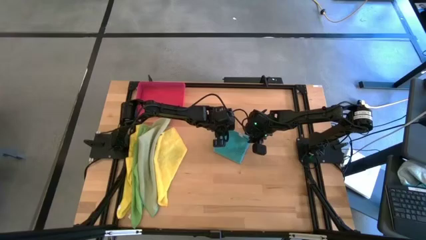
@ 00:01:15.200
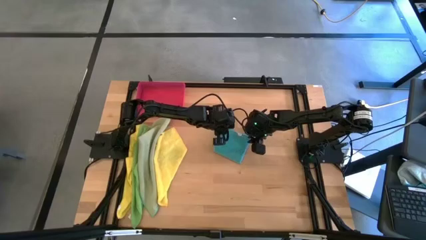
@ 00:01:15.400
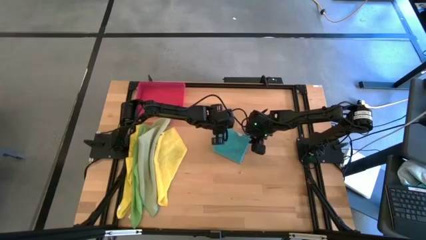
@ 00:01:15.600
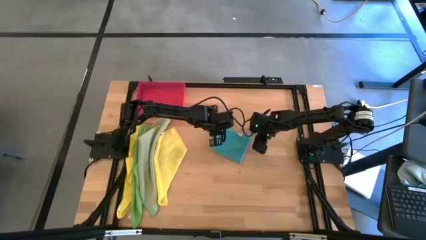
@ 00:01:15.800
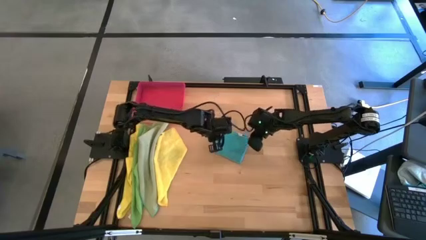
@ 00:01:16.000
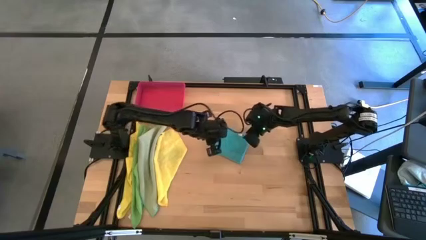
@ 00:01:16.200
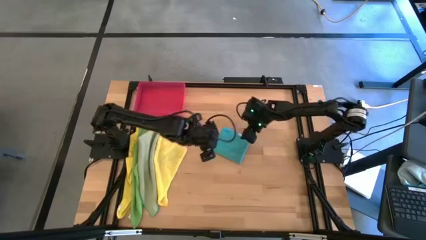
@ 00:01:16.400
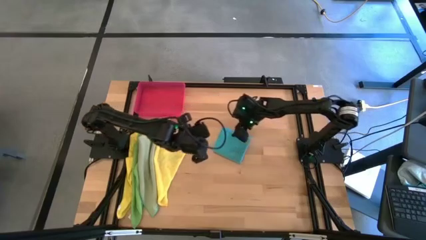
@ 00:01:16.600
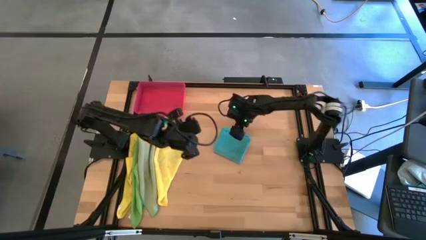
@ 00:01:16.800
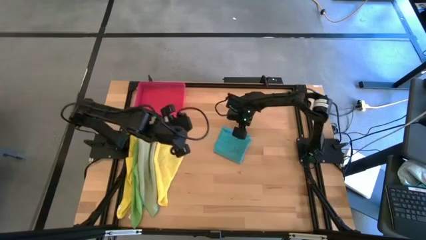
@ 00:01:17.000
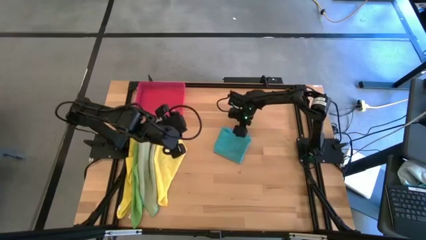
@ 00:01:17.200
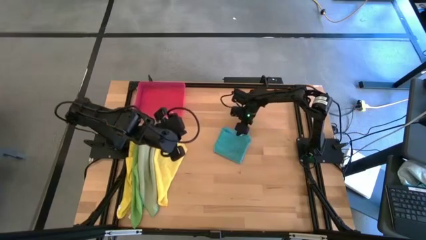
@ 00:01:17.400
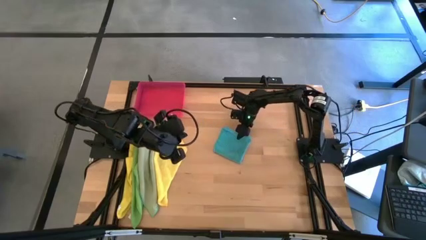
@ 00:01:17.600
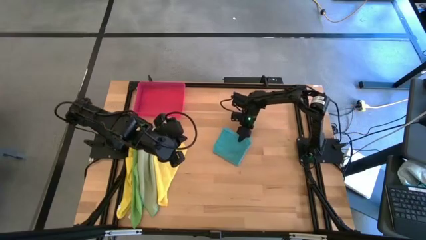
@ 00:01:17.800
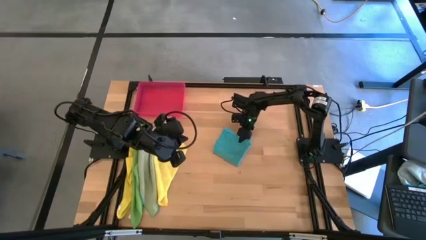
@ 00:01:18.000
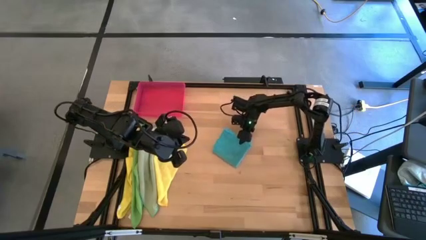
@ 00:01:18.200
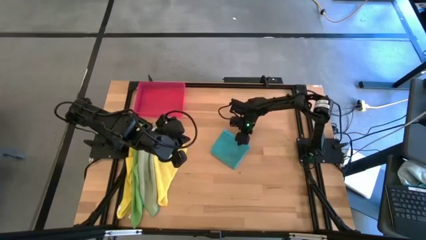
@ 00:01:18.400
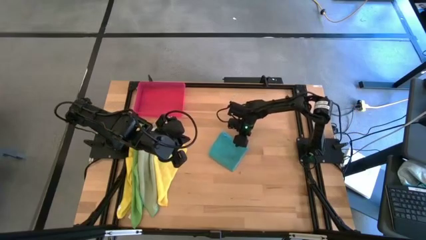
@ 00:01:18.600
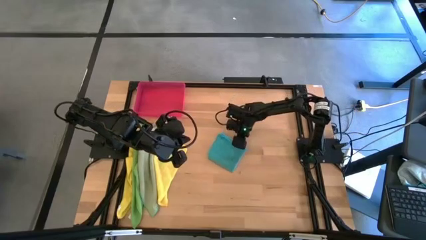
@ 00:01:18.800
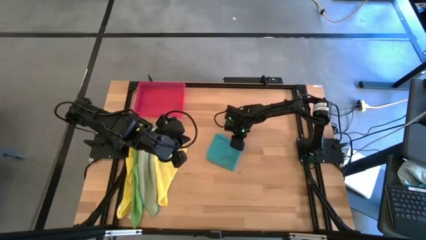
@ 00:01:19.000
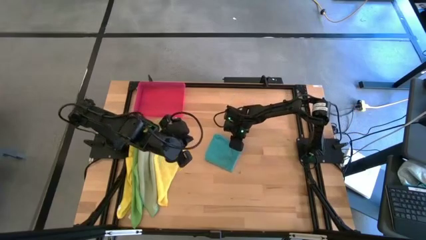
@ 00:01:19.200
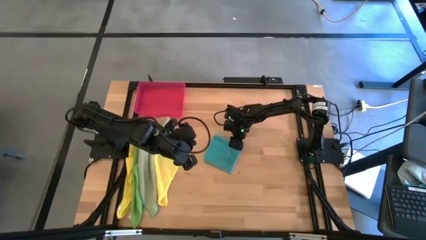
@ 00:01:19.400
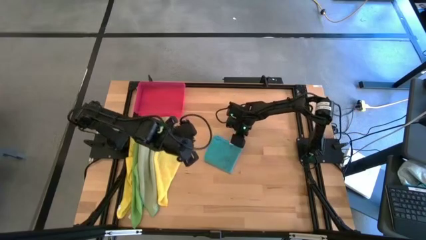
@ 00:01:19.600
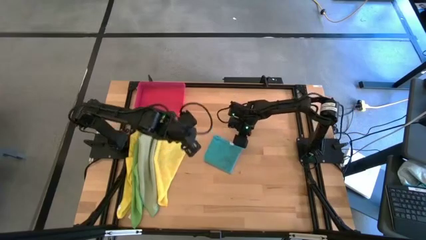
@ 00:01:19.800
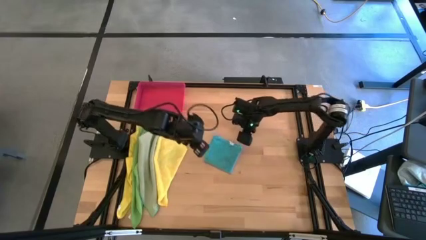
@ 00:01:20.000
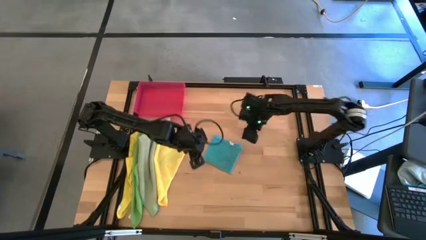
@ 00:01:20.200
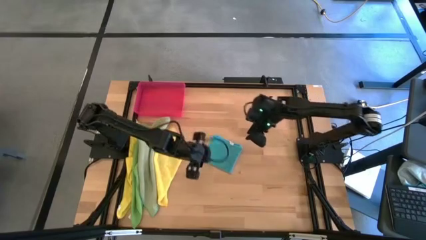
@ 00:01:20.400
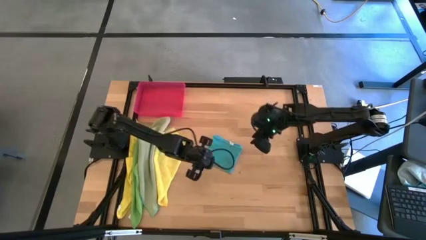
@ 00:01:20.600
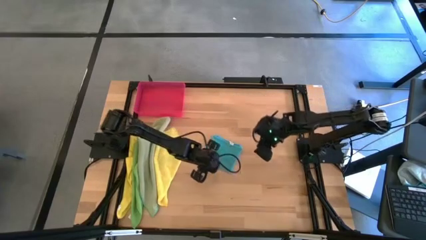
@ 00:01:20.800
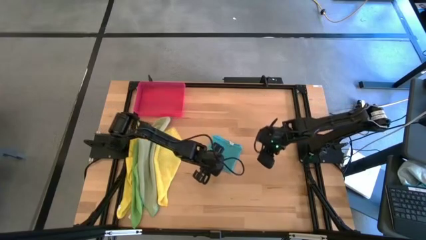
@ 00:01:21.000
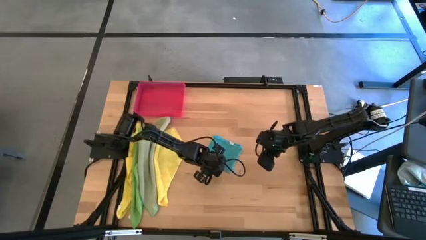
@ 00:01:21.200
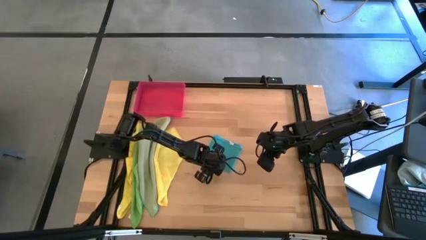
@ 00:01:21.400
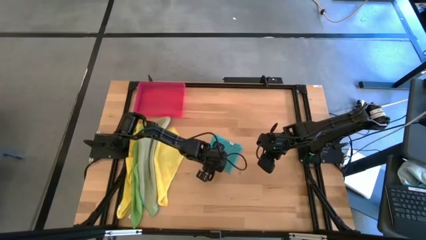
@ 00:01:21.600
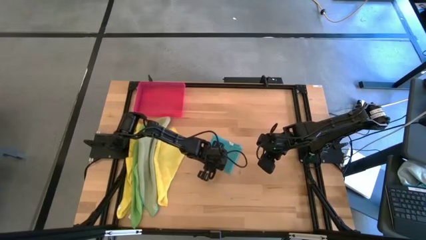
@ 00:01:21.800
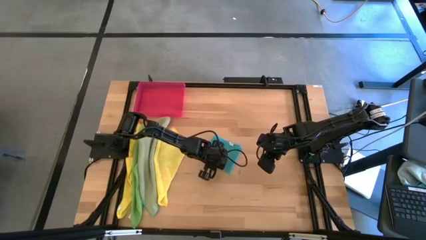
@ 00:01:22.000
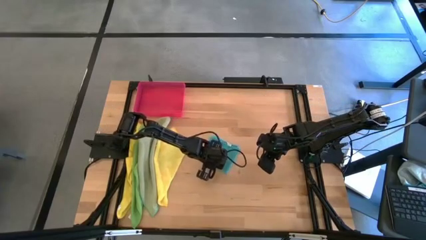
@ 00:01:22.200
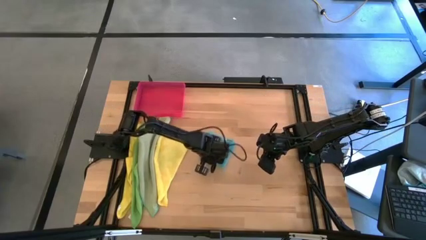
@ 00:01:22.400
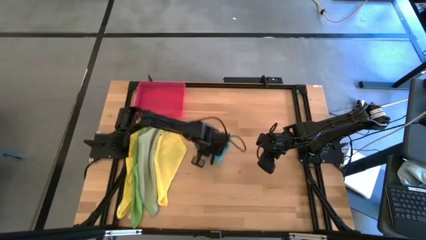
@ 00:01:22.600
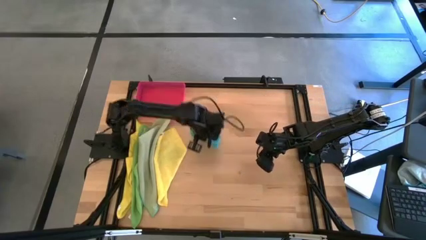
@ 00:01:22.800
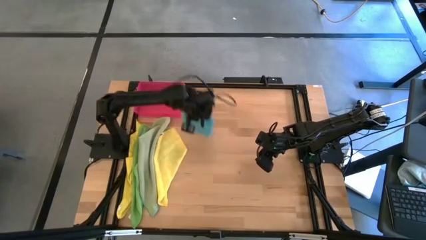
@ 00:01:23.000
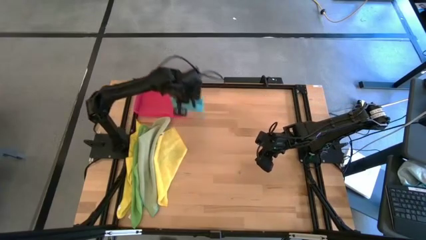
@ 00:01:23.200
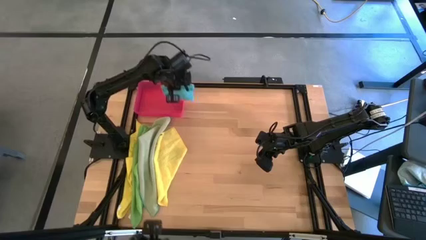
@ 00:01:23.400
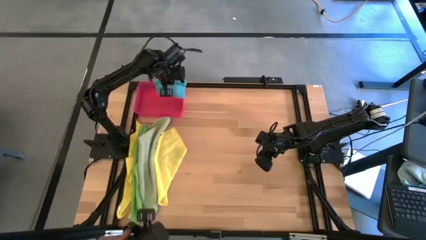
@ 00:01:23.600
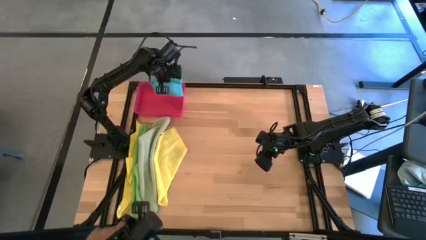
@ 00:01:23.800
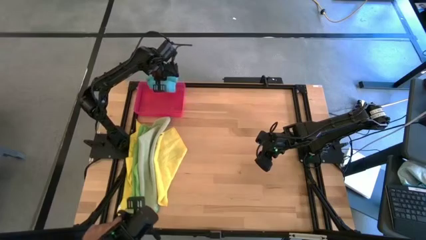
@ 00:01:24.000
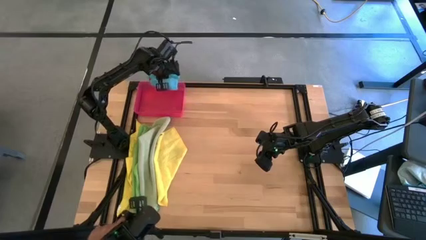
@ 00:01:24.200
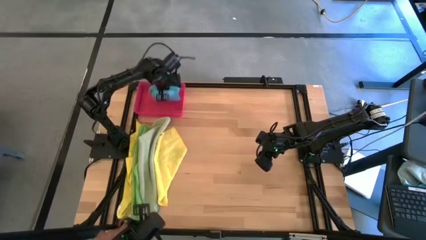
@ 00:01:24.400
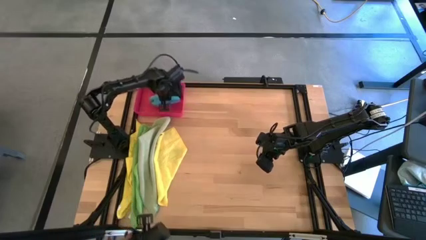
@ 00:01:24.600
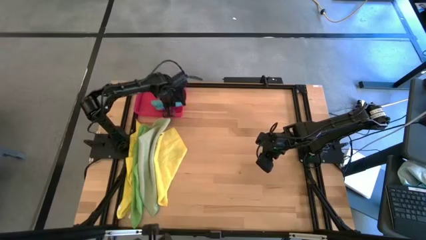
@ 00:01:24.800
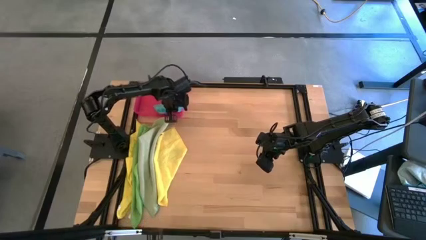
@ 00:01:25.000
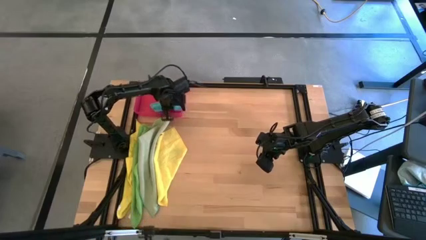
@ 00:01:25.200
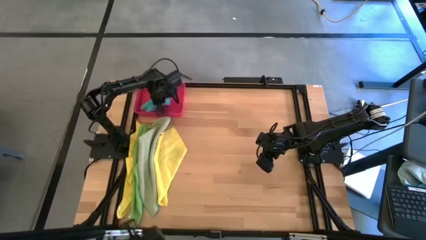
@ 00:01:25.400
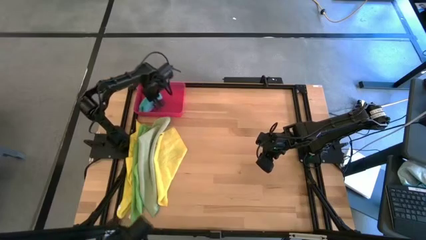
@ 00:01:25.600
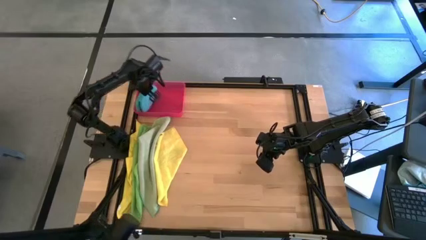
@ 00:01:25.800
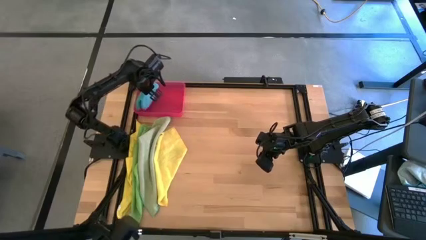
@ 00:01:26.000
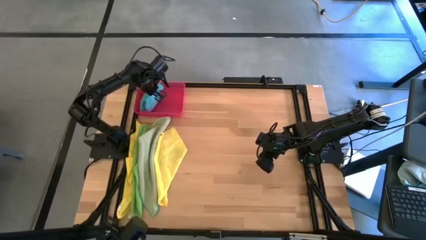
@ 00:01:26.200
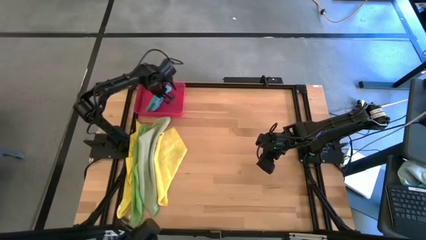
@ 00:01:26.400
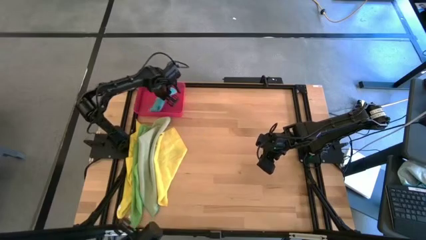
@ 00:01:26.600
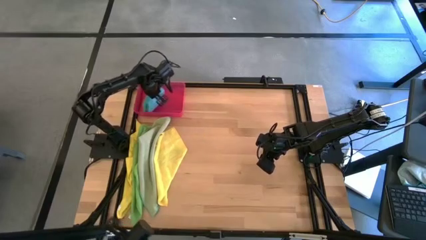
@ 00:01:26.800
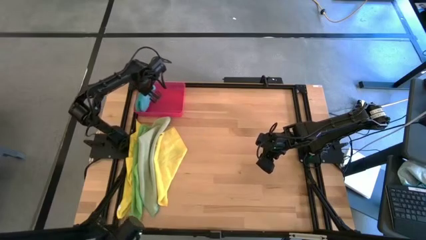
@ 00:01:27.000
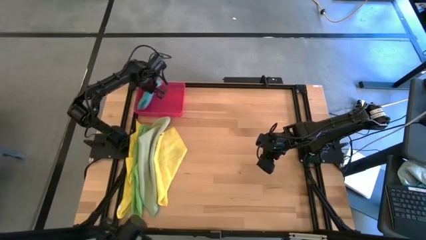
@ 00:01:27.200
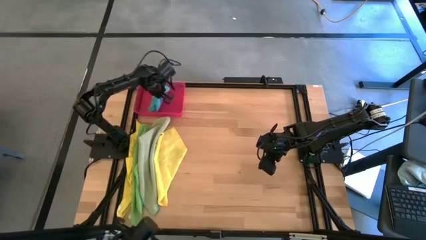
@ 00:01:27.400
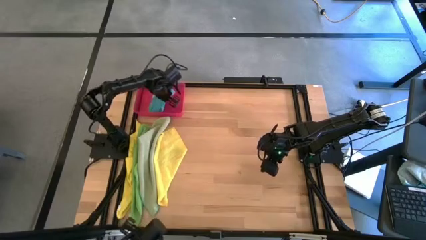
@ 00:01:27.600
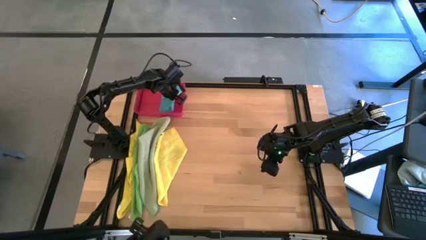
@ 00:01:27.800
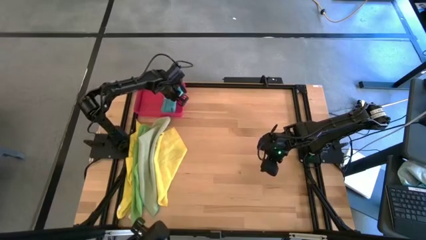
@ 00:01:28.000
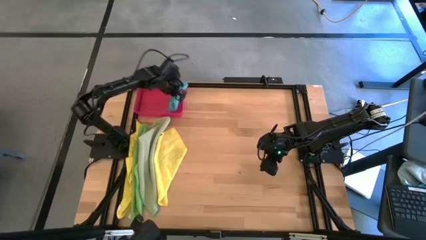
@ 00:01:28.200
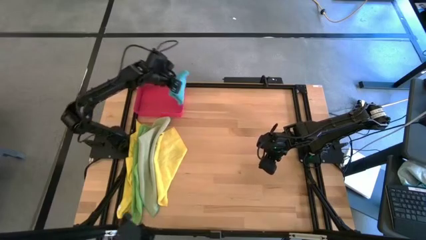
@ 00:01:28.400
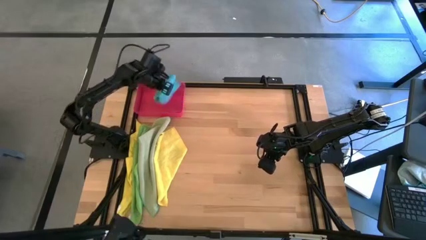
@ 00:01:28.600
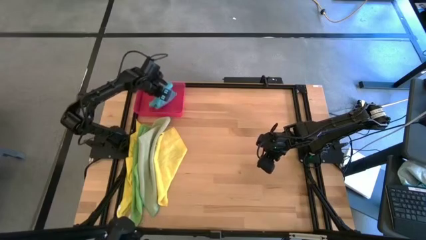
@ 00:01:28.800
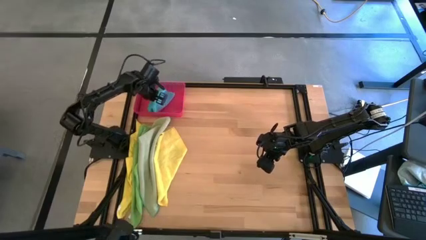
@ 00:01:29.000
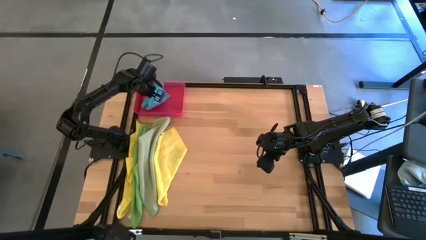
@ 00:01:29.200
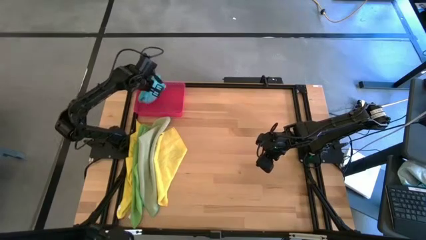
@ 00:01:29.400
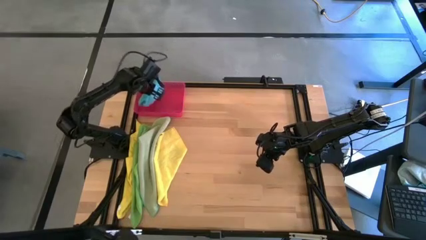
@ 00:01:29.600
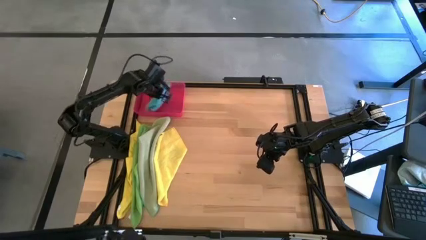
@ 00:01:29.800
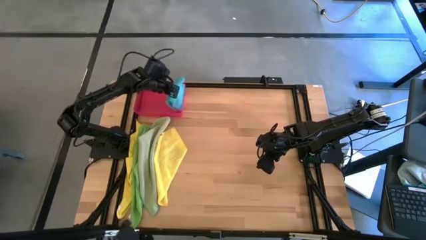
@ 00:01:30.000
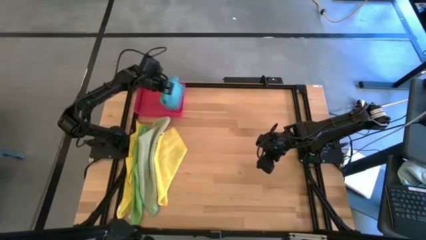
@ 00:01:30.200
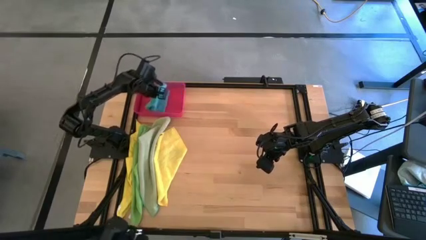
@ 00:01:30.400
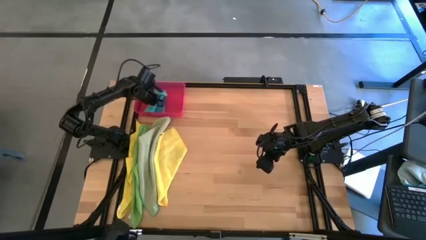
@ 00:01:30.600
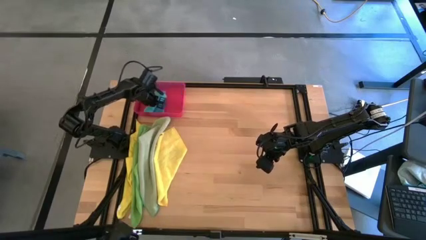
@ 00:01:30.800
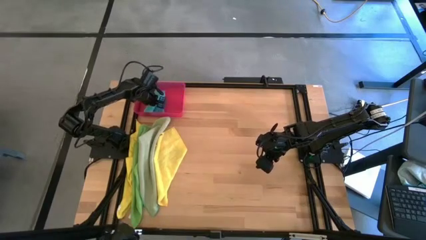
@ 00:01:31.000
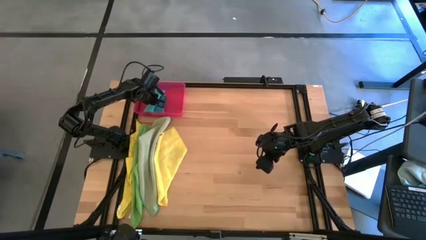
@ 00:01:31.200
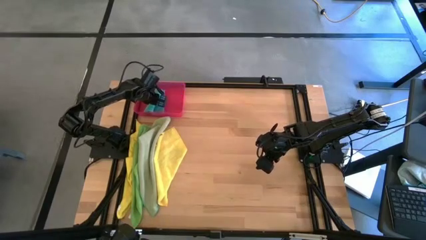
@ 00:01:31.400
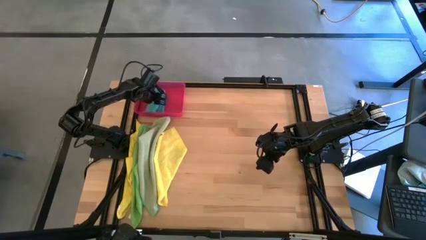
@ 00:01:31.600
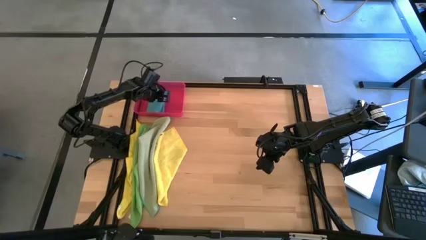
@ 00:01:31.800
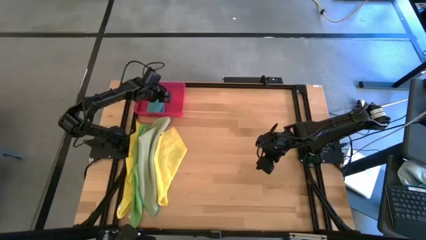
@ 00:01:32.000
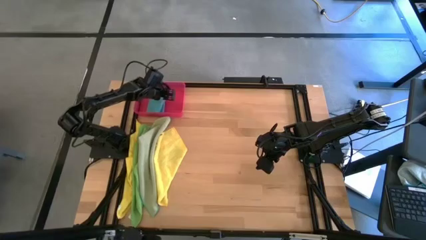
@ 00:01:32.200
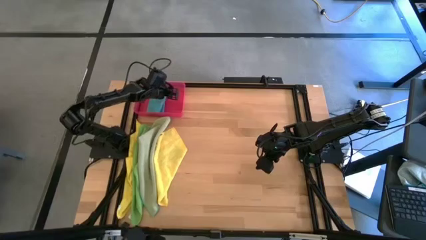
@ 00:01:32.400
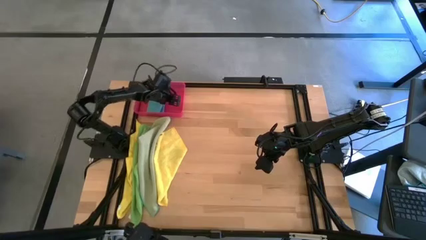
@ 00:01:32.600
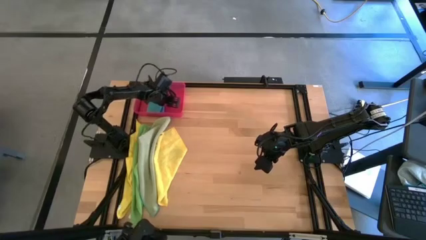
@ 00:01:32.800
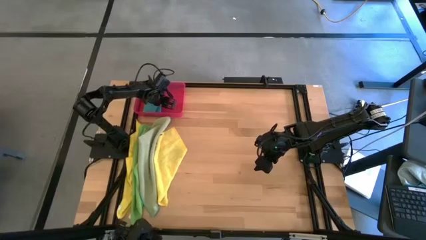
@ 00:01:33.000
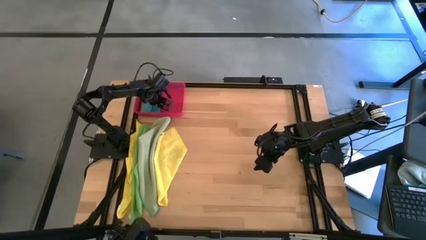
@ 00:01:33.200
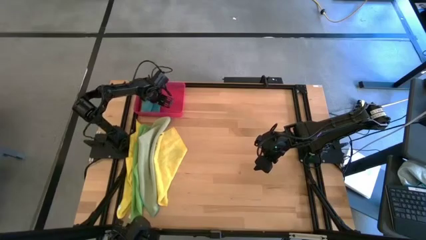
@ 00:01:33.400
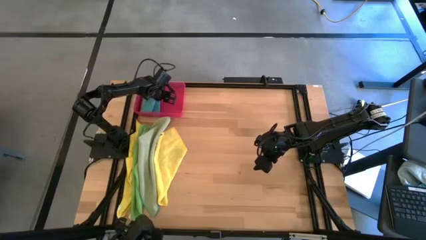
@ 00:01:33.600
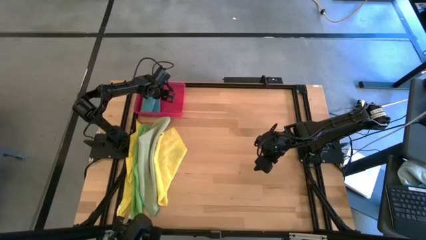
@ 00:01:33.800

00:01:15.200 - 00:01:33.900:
Task: Fold microfiber towels
Put the blue folded microfiber towel into the pink bin
